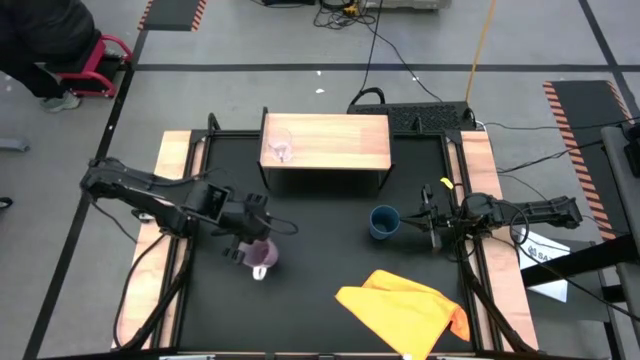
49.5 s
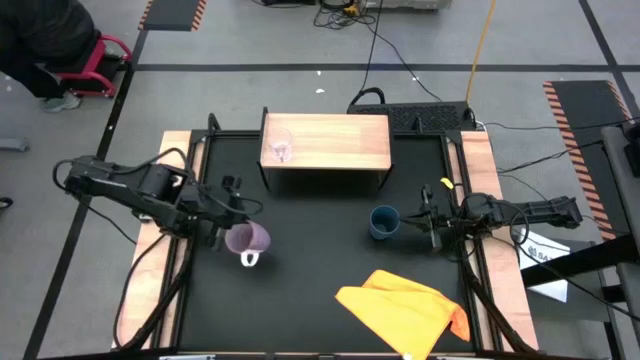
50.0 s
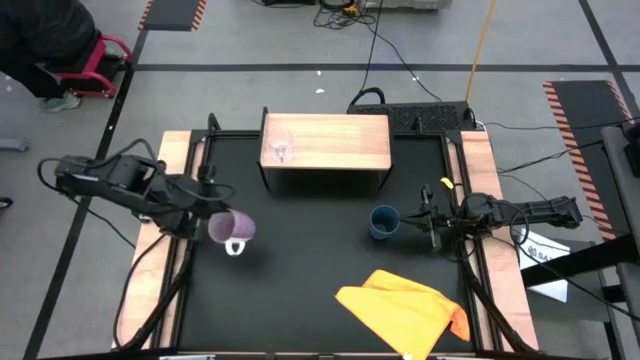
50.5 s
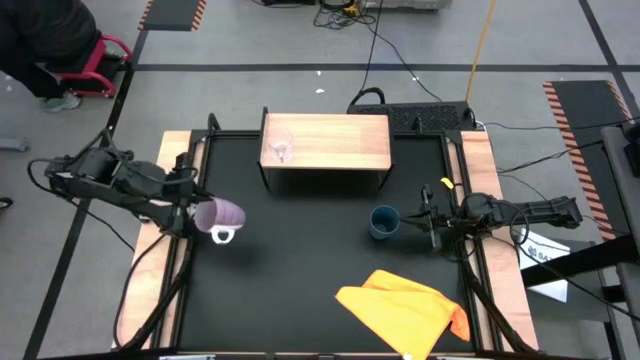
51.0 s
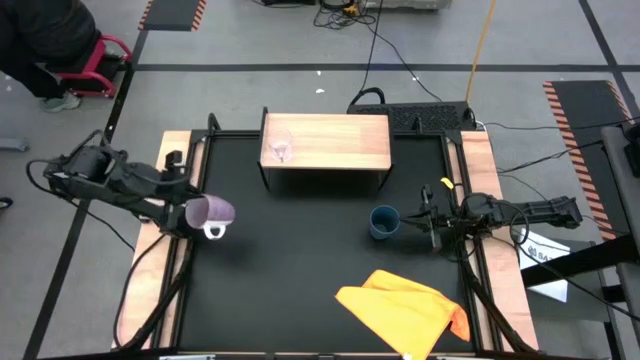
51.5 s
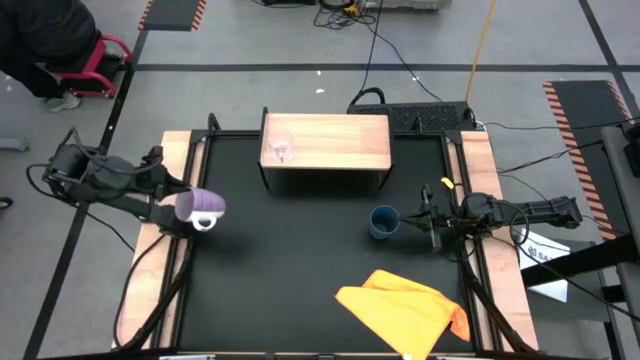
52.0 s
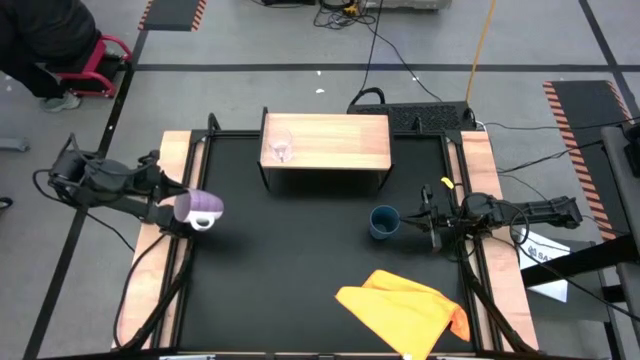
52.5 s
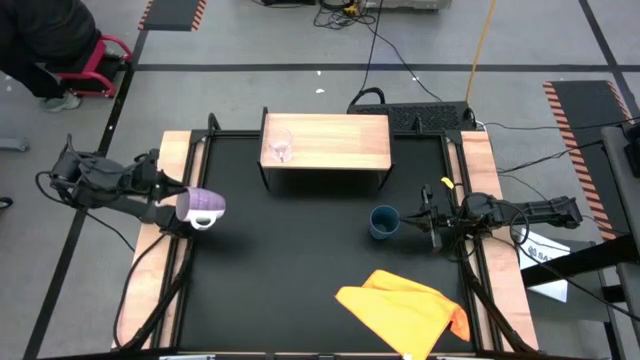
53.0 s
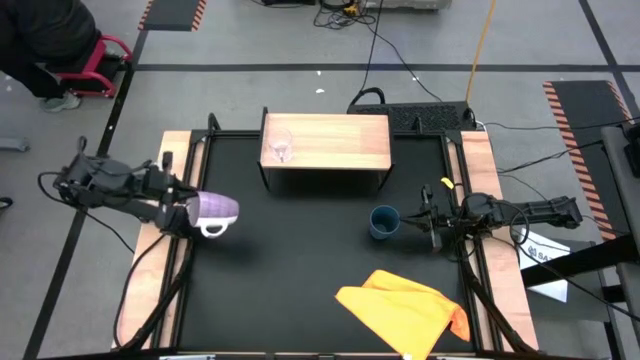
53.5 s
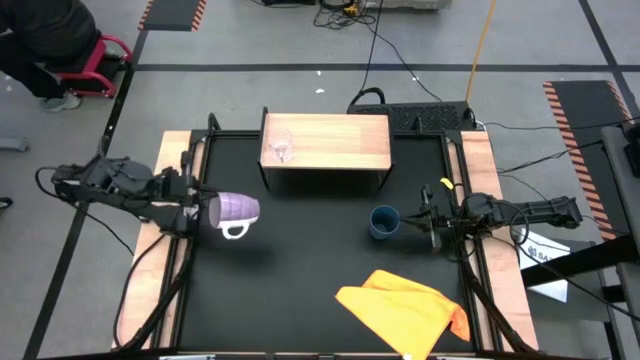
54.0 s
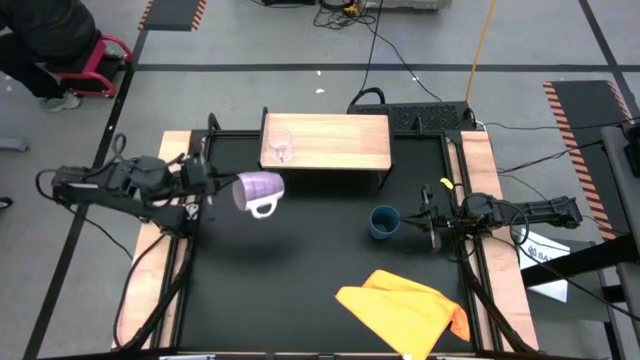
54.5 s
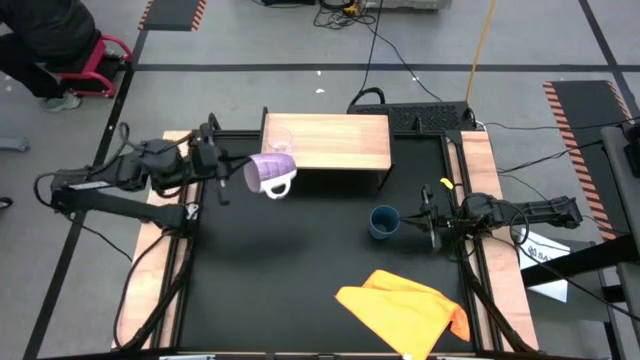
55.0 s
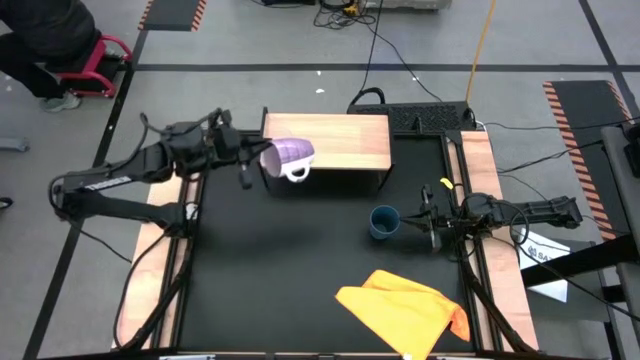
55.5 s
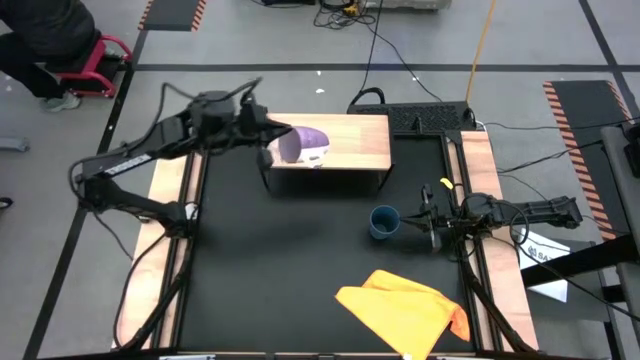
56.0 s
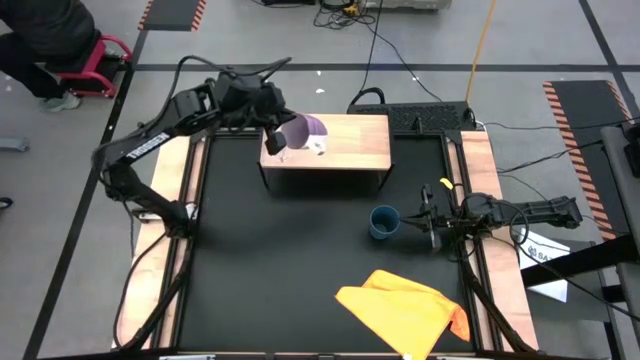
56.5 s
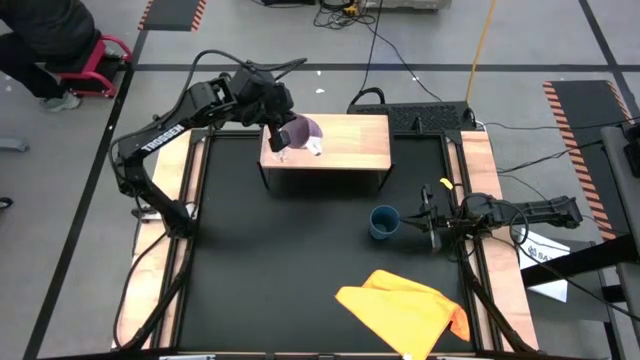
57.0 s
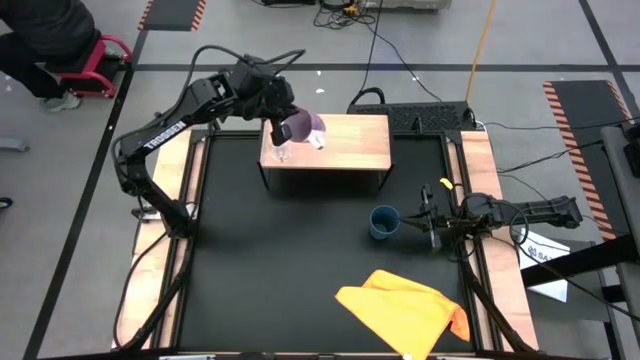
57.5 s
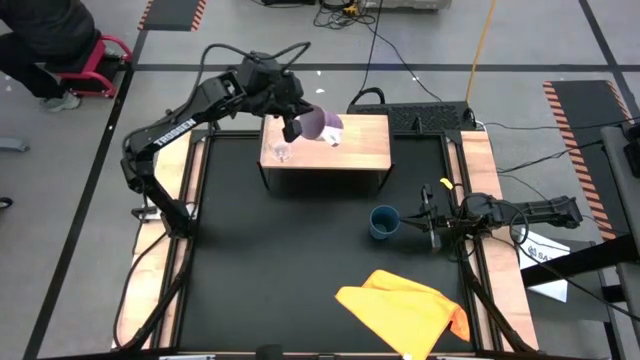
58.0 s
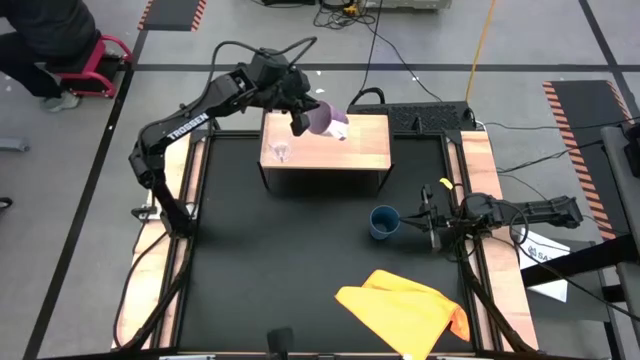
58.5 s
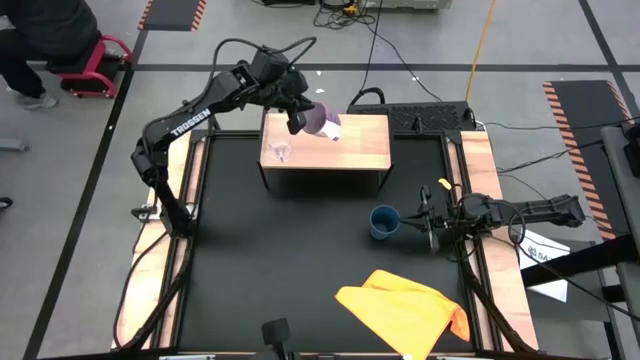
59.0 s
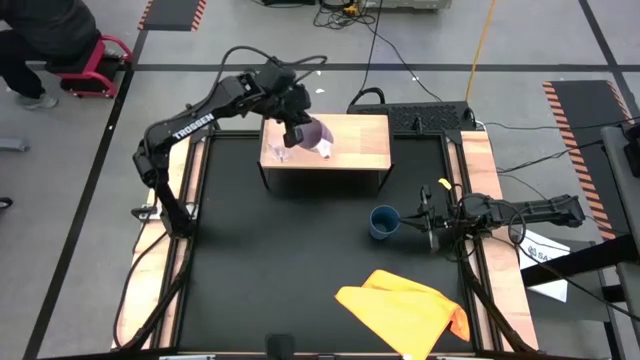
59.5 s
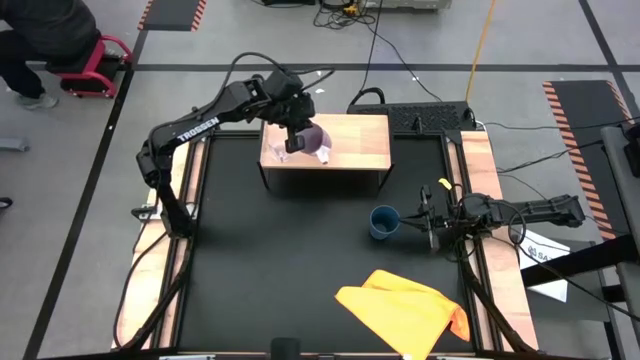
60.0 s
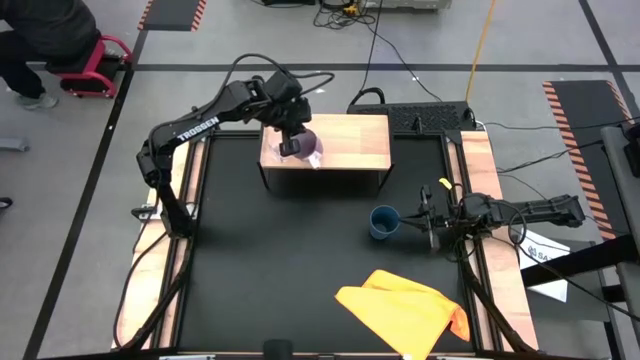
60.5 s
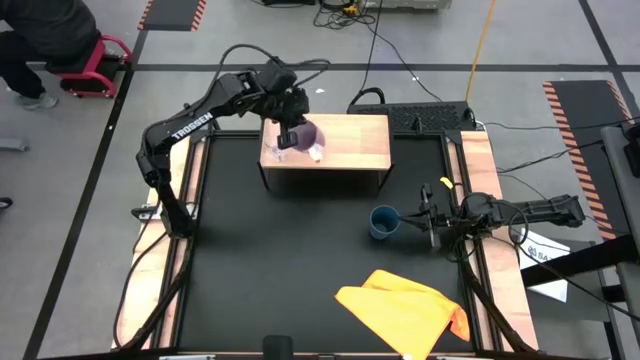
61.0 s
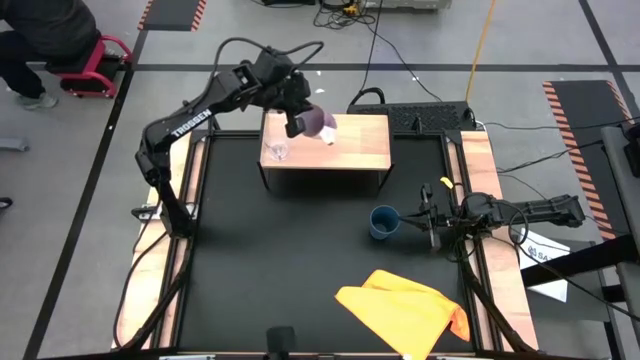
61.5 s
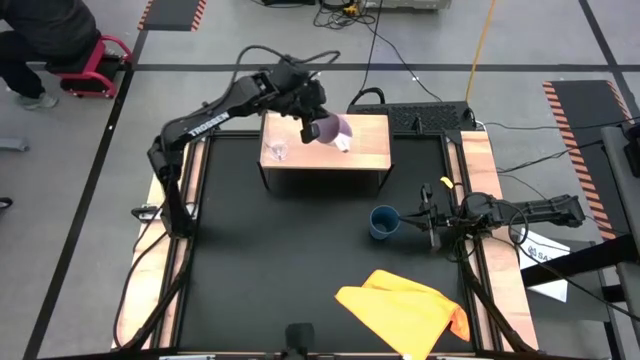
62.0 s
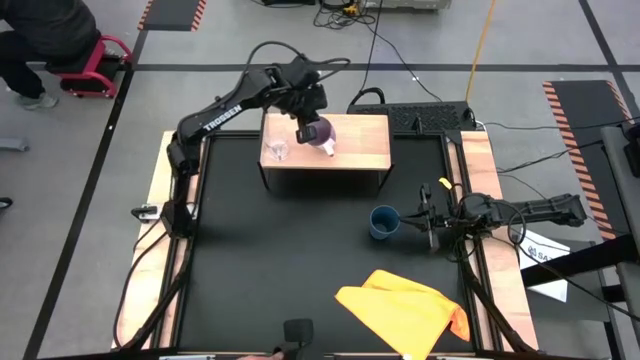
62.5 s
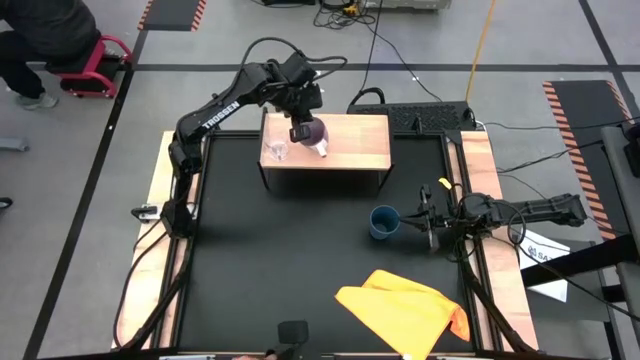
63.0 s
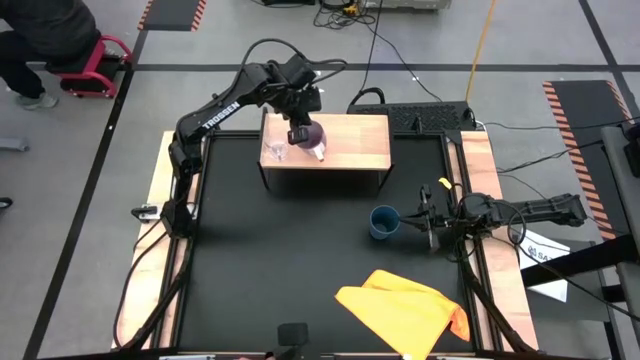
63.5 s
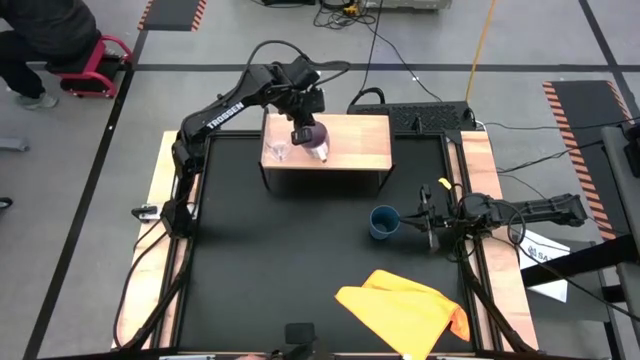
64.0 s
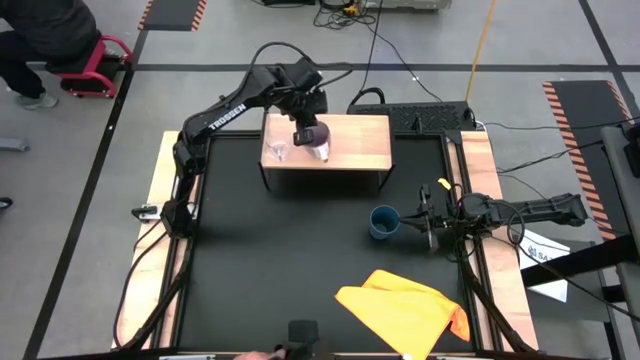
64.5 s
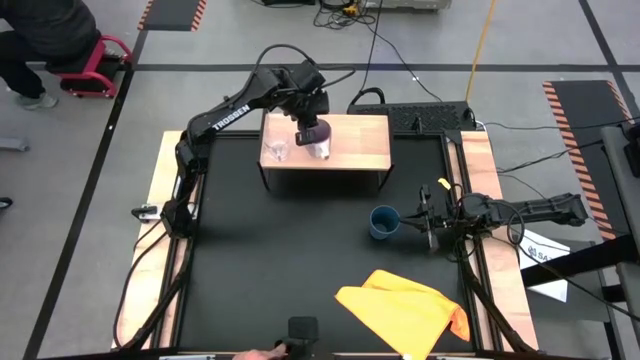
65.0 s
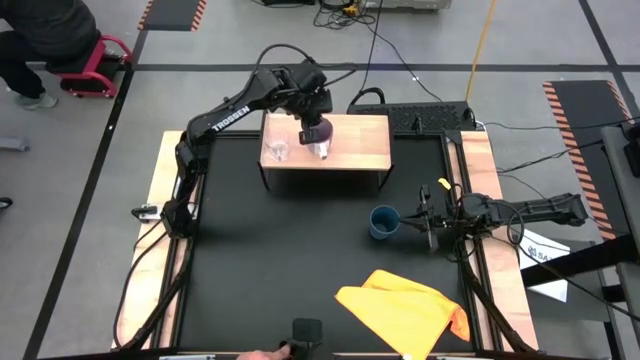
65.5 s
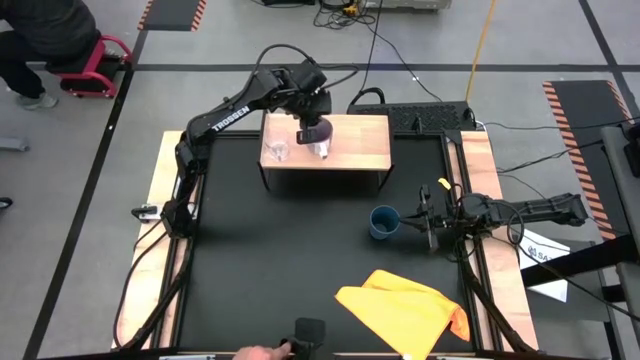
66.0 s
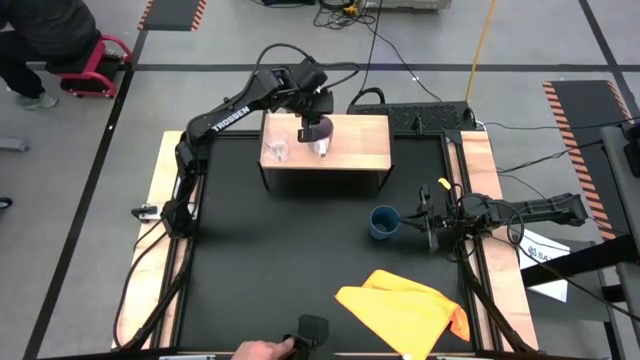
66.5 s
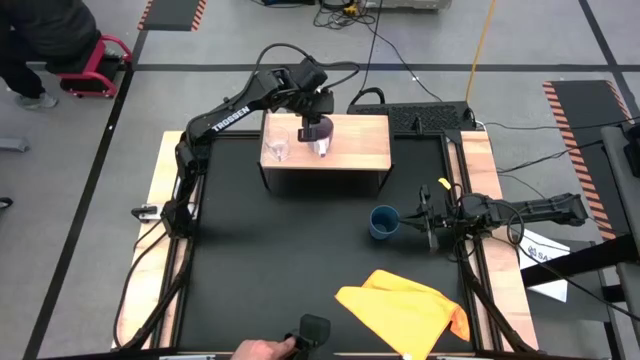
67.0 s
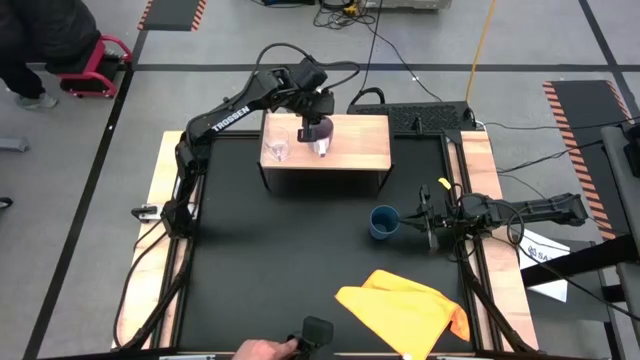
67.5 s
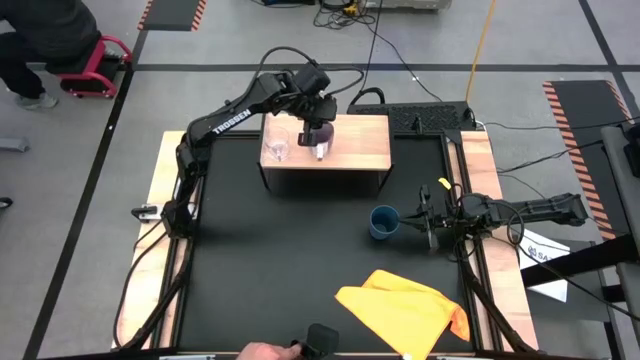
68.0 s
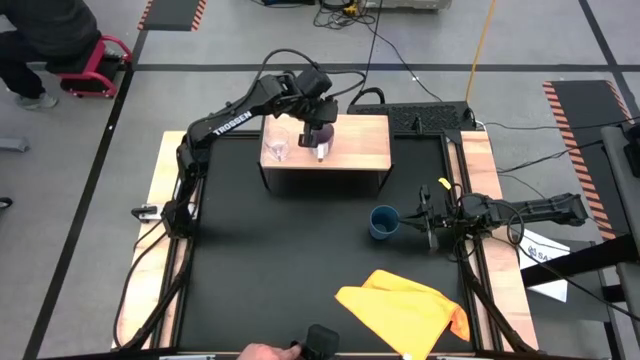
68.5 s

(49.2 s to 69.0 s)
Task: Stack small to large cups/mugs on shelf
Put the violet patterned mug on the shelf
